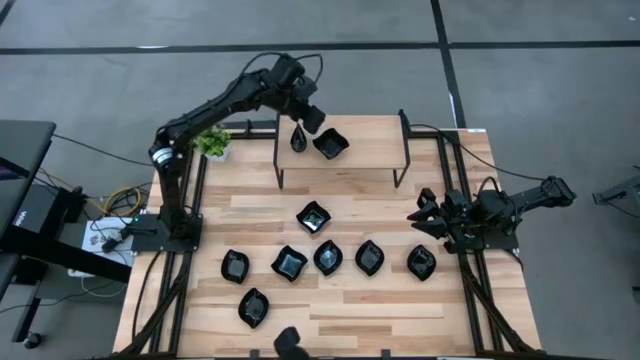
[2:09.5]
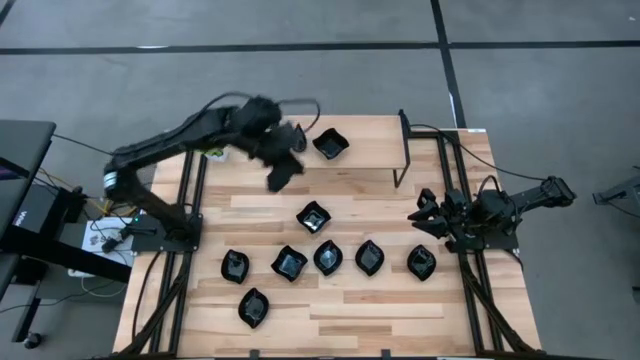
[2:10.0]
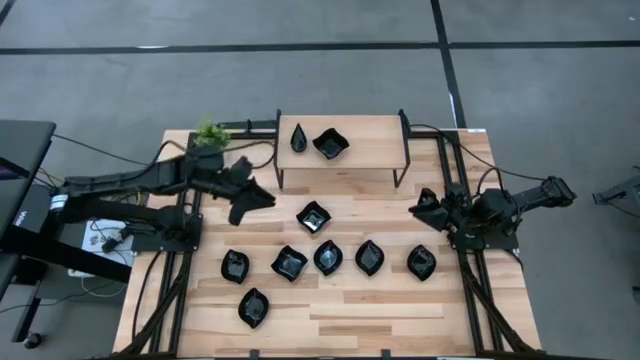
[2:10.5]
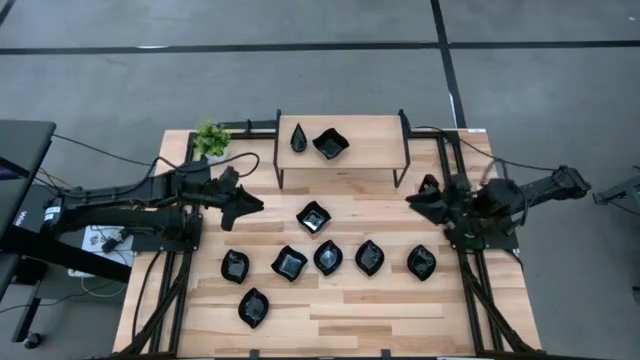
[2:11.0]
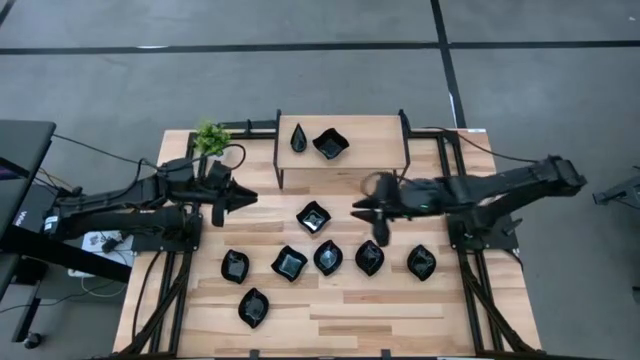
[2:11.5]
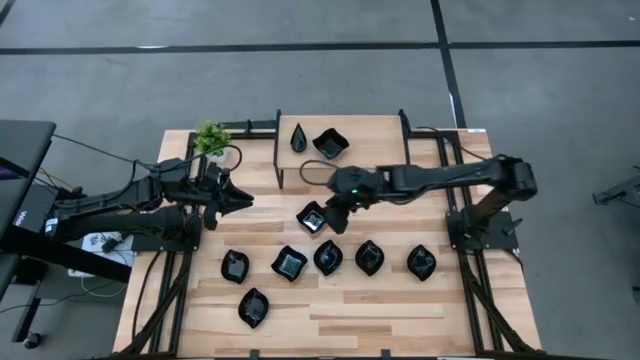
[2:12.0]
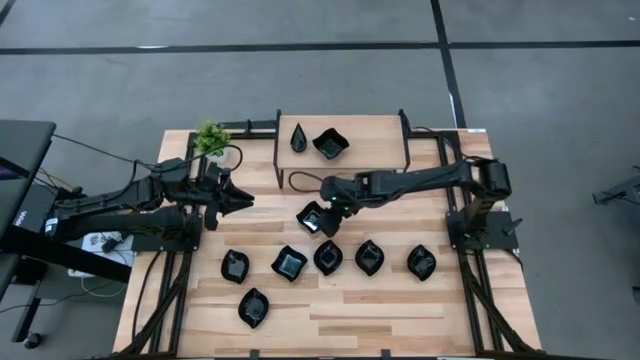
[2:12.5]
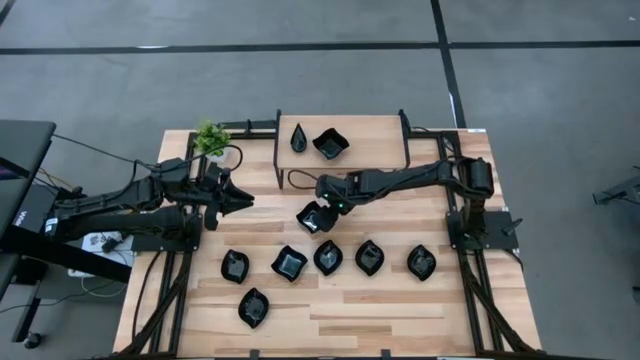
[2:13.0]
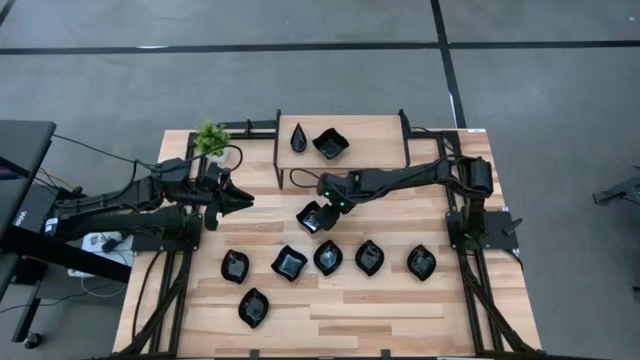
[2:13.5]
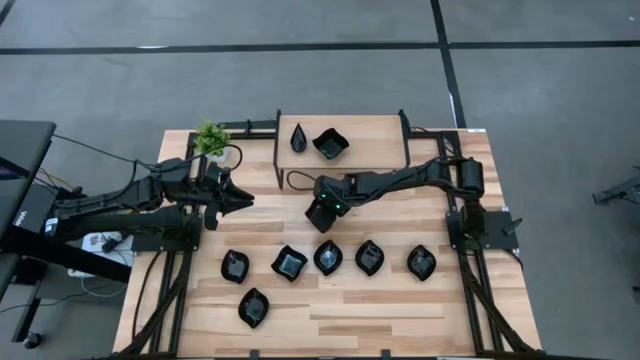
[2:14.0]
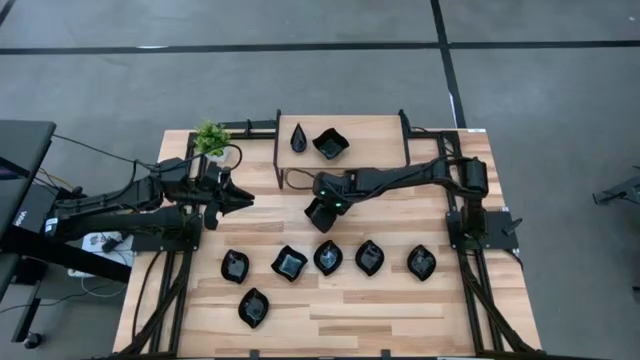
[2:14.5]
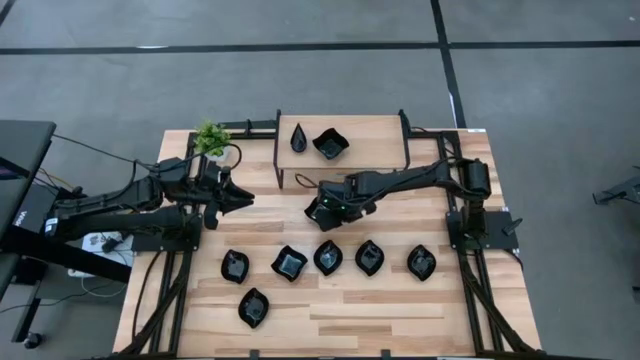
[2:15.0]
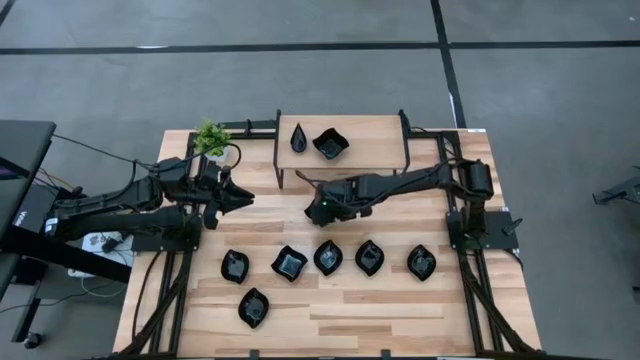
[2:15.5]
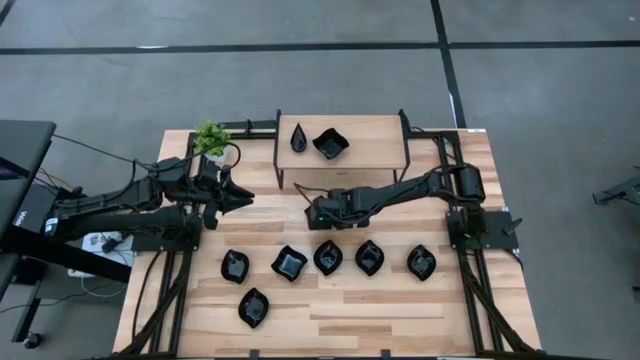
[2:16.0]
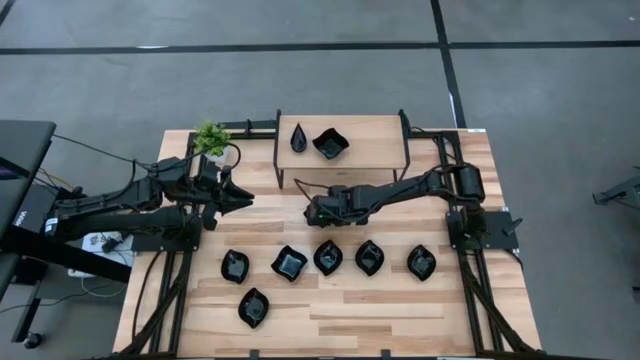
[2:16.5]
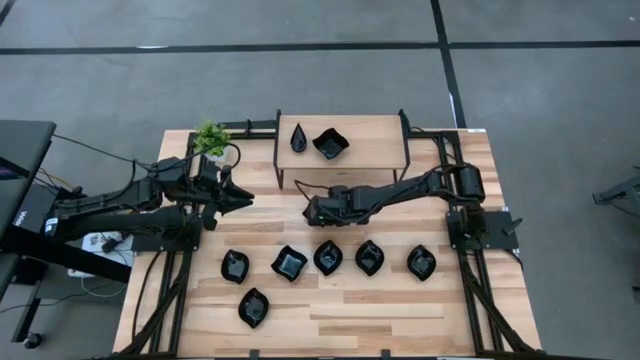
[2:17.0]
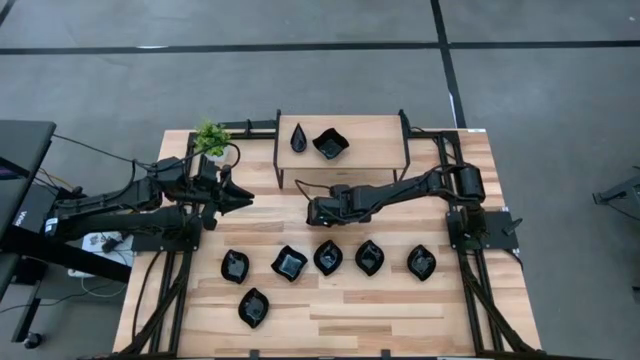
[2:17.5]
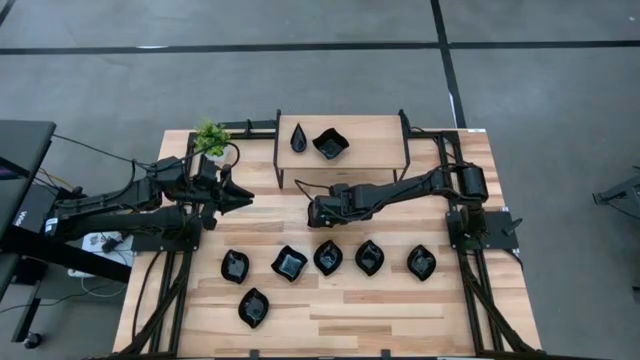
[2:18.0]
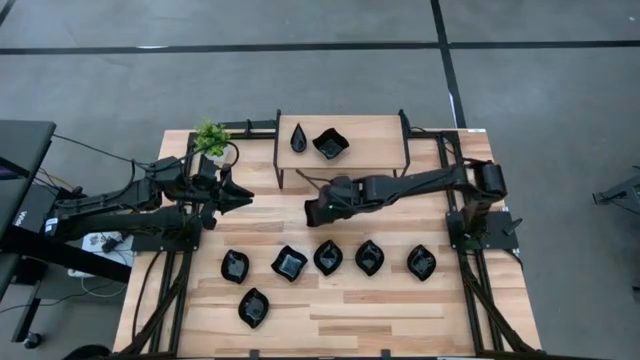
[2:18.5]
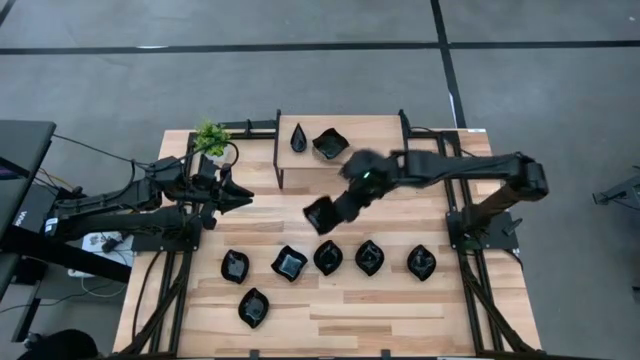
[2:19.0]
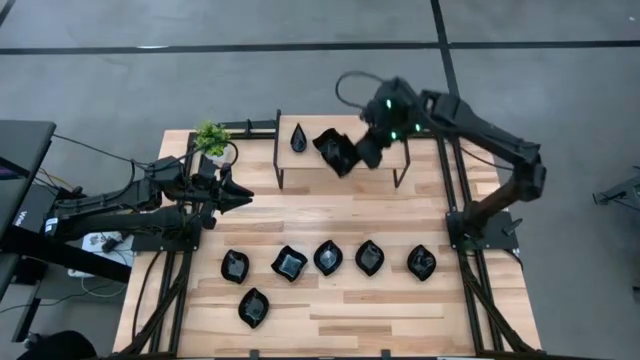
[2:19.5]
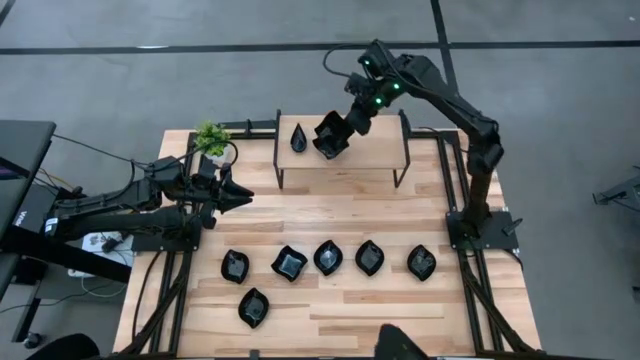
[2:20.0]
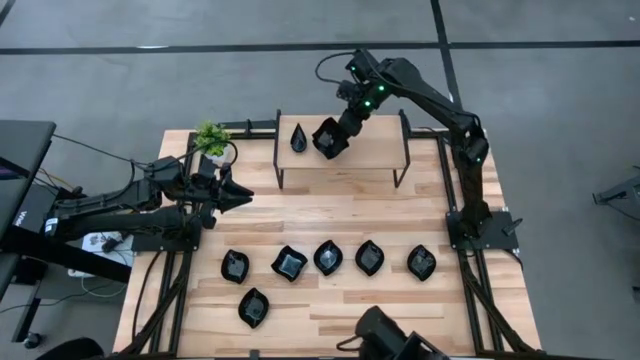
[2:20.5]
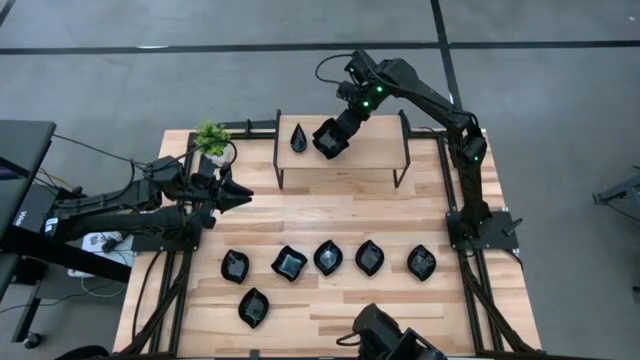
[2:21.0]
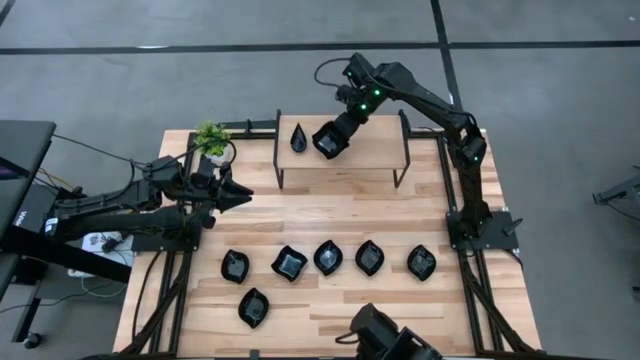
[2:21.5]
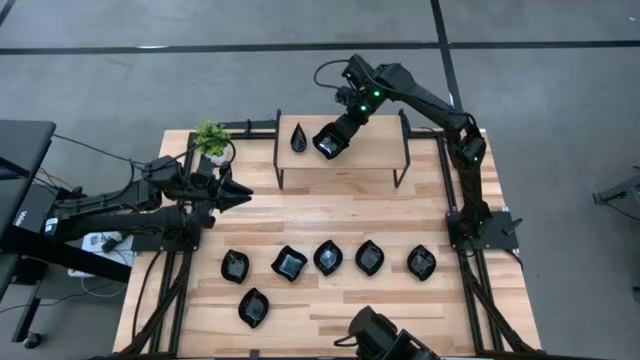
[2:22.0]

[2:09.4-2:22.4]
Task: Pick & Place Mini shaped plates
Stack the black distorted square plate on top of the black distorted square plates on the shelf

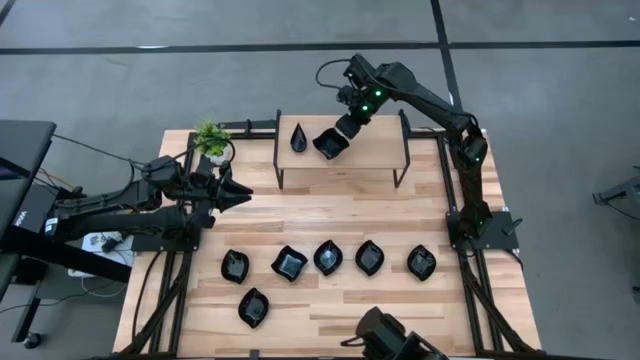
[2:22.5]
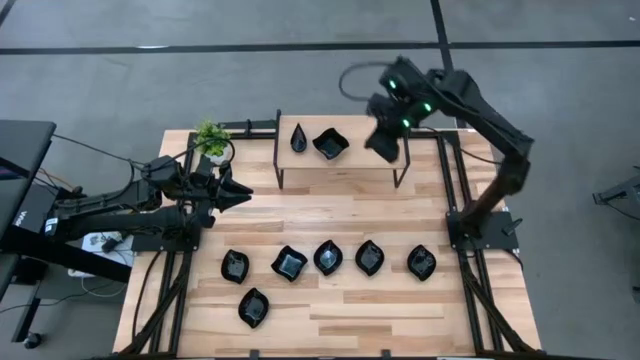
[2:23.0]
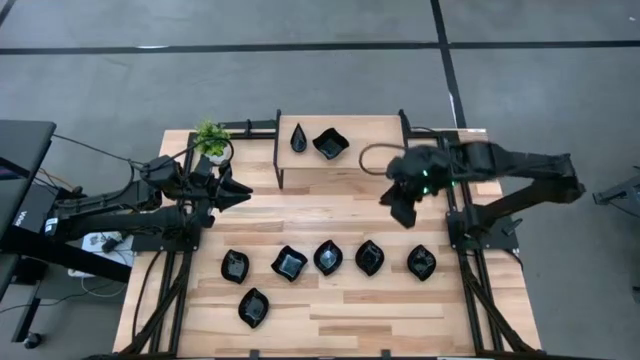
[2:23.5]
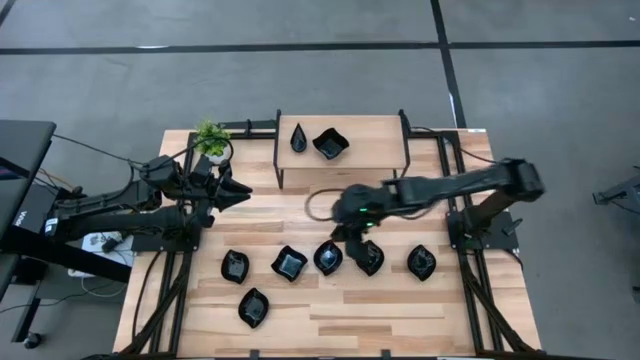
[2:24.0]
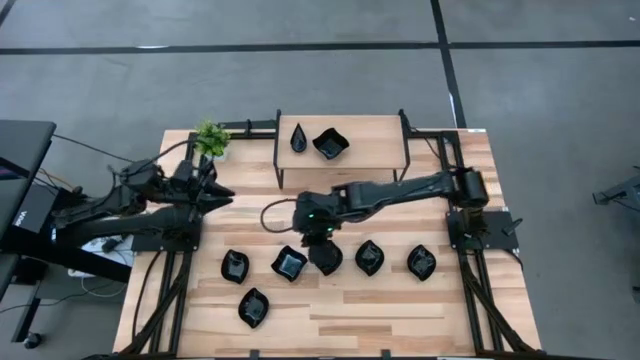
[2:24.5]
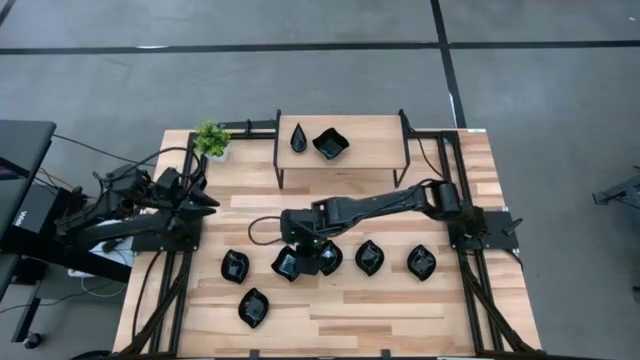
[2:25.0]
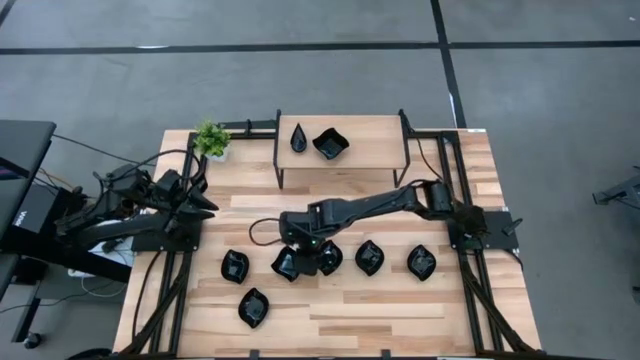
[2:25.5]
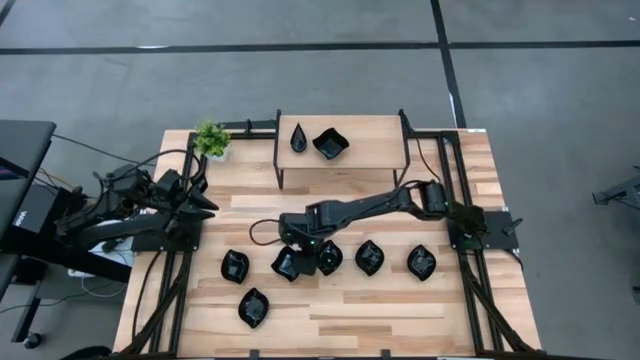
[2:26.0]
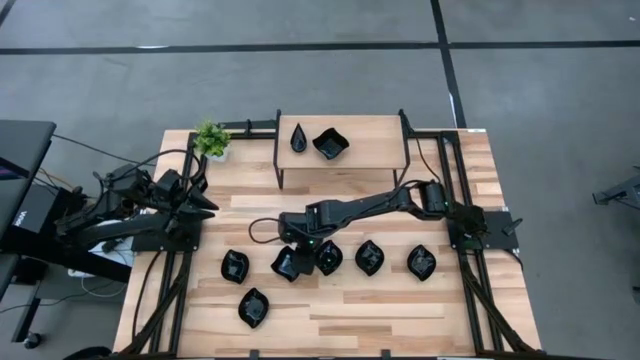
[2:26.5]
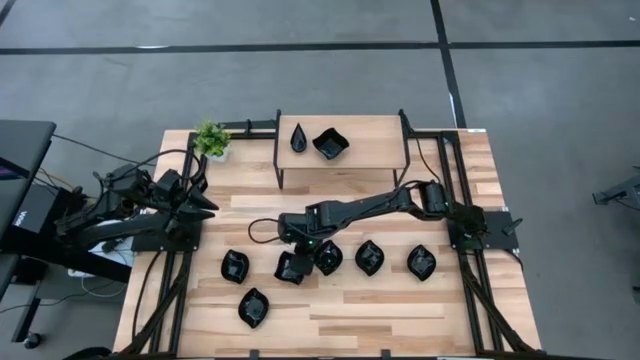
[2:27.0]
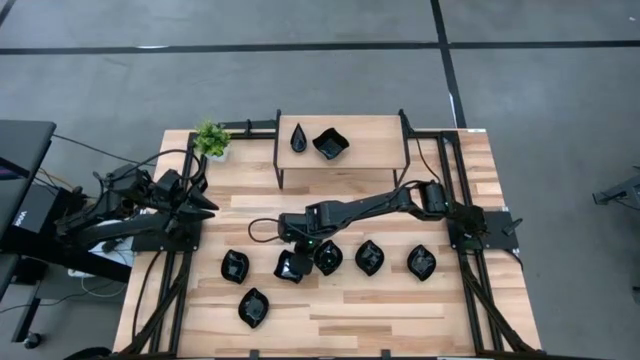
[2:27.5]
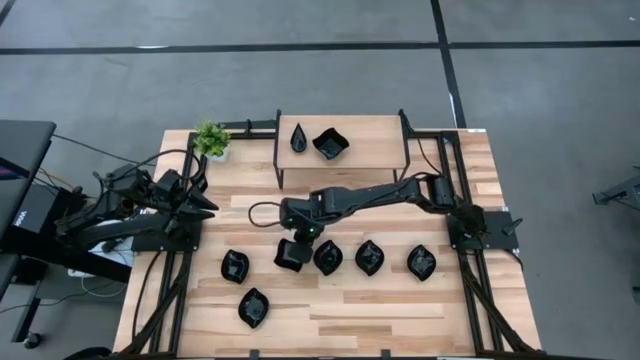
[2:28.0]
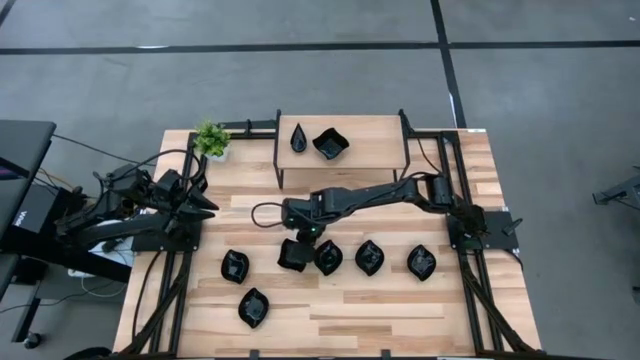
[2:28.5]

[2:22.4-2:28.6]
Stack the black distorted square plate on top of the black distorted square plates on the shelf

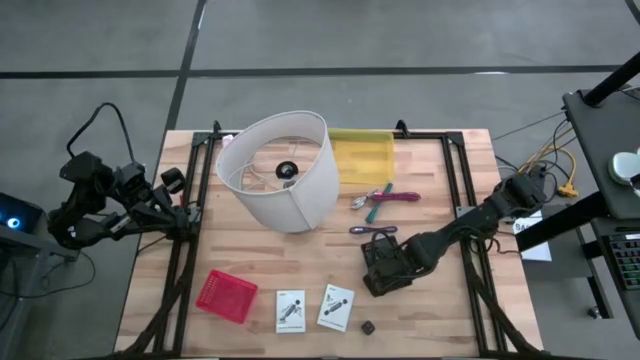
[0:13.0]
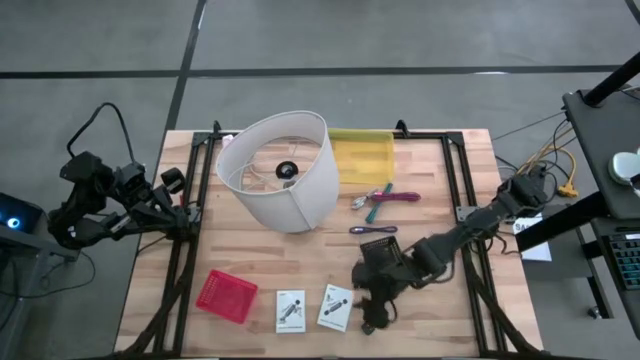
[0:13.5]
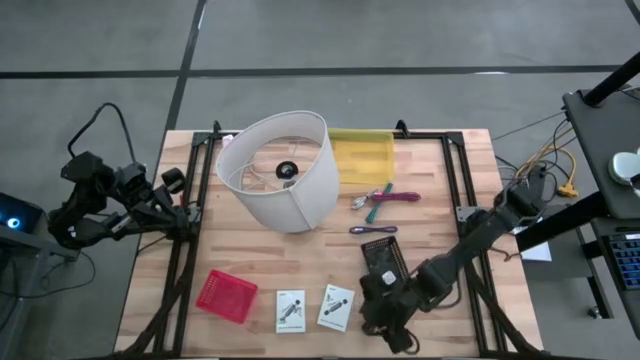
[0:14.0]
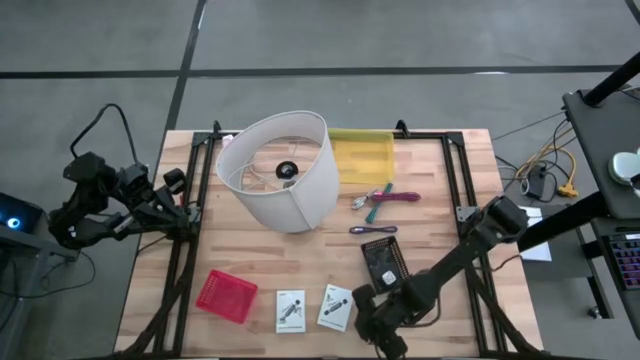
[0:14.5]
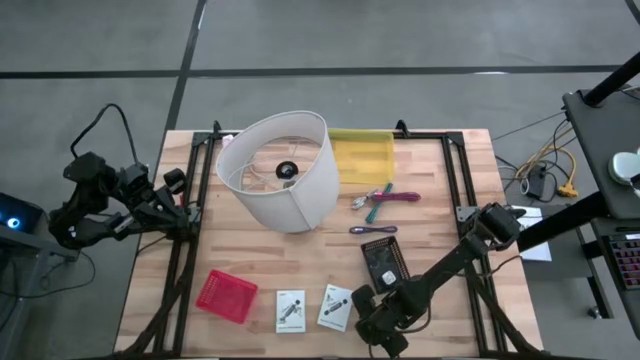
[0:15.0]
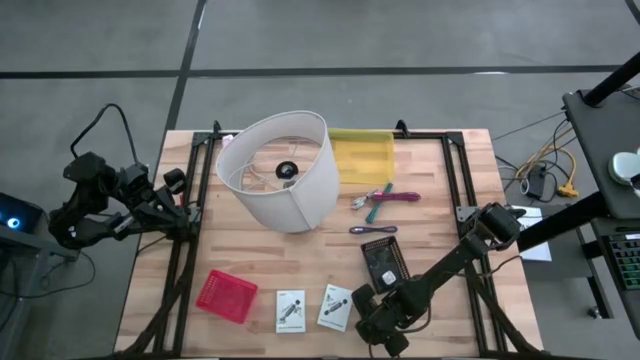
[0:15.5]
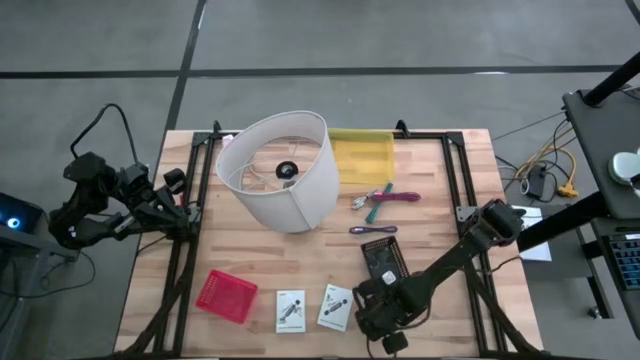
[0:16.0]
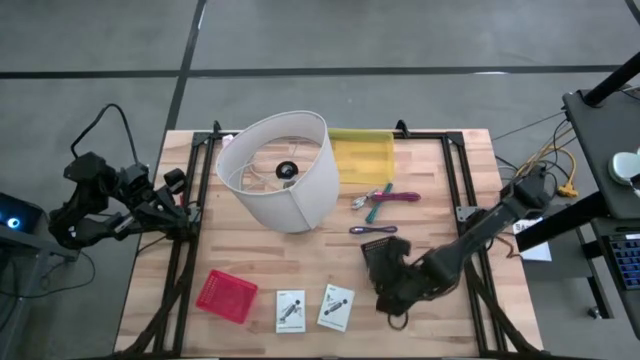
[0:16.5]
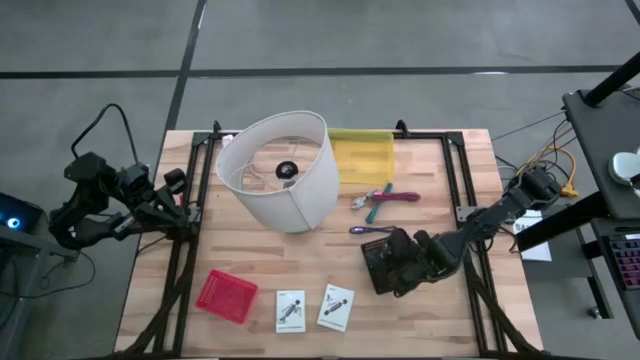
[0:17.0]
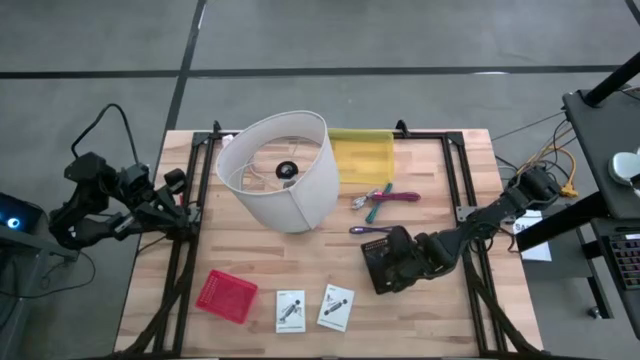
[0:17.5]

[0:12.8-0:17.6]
Task: Pick and place items into bin
Put the black adapter into the black bin
